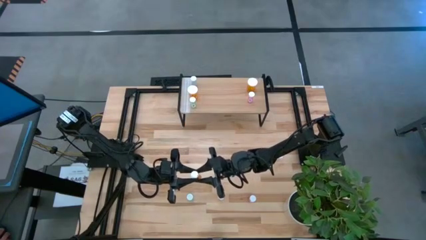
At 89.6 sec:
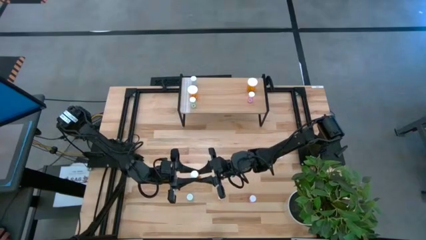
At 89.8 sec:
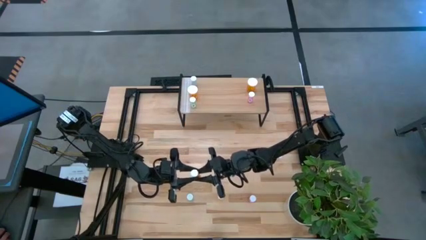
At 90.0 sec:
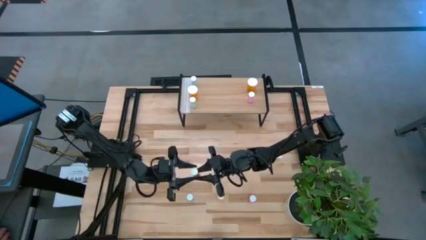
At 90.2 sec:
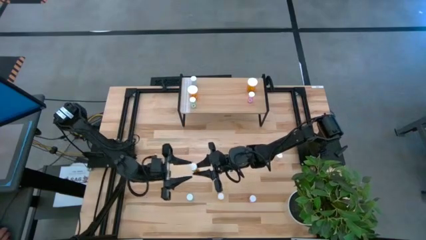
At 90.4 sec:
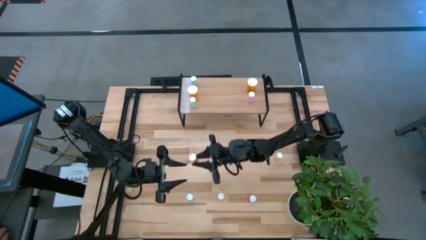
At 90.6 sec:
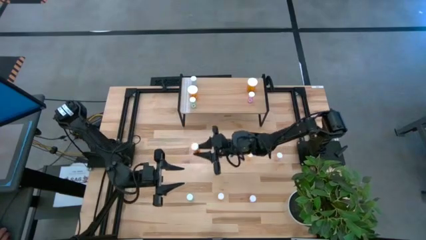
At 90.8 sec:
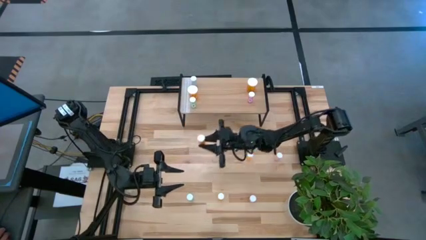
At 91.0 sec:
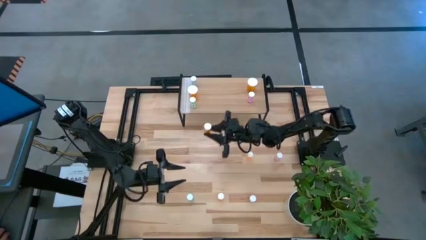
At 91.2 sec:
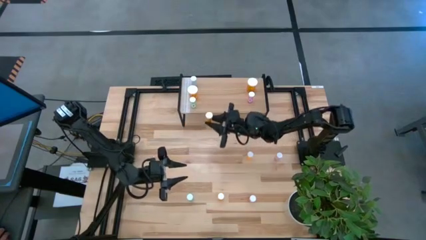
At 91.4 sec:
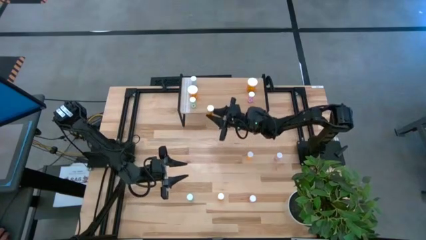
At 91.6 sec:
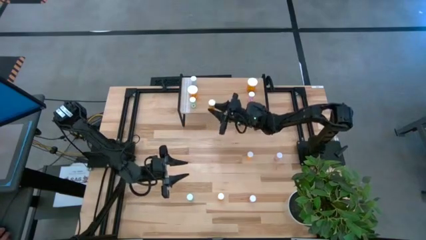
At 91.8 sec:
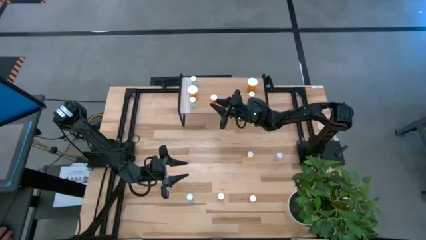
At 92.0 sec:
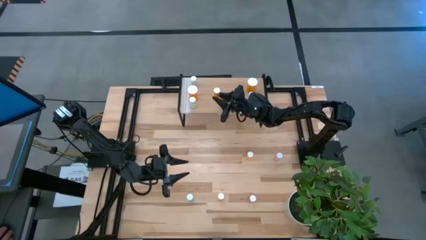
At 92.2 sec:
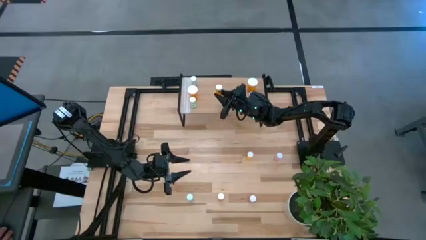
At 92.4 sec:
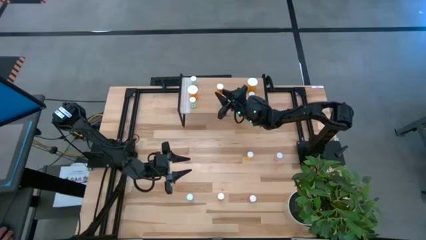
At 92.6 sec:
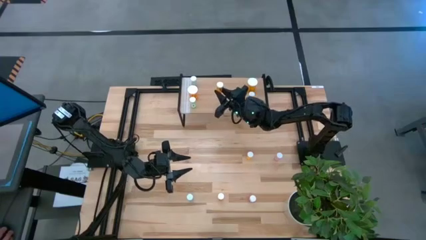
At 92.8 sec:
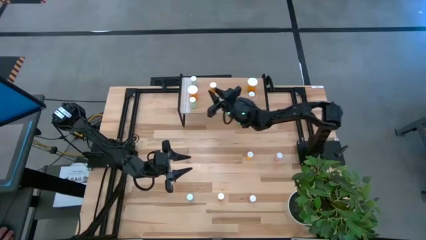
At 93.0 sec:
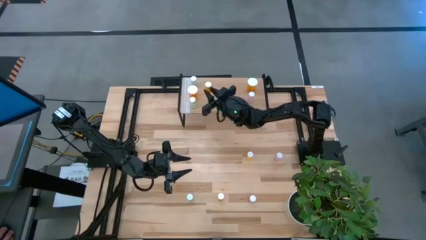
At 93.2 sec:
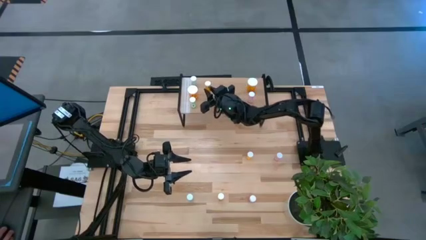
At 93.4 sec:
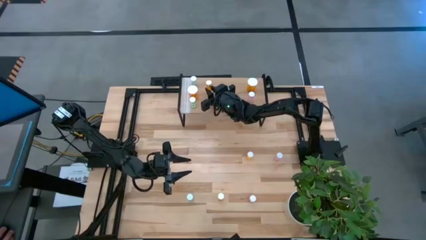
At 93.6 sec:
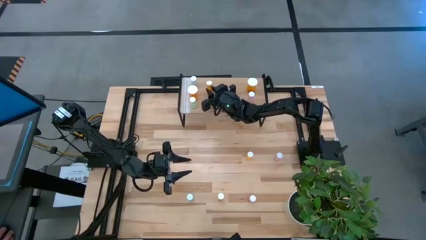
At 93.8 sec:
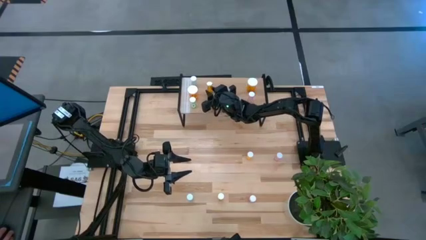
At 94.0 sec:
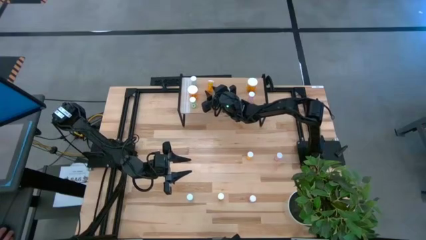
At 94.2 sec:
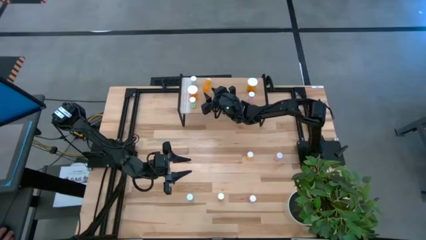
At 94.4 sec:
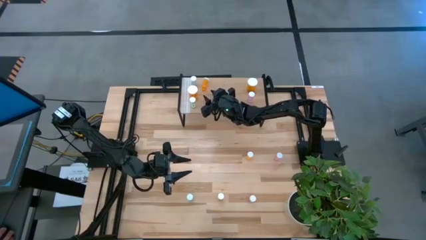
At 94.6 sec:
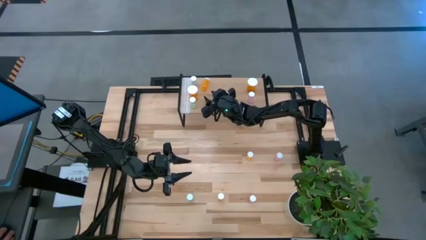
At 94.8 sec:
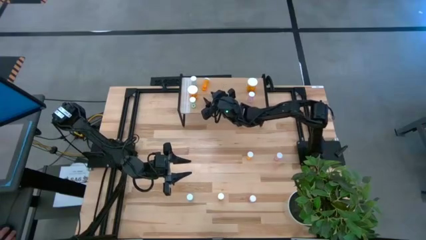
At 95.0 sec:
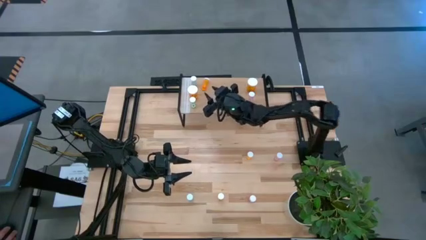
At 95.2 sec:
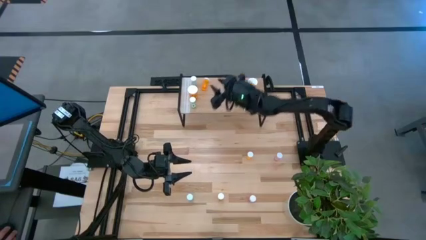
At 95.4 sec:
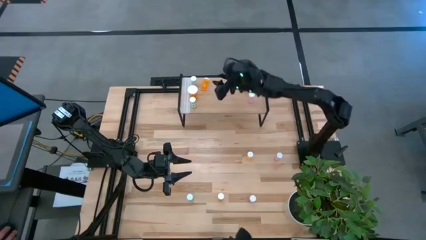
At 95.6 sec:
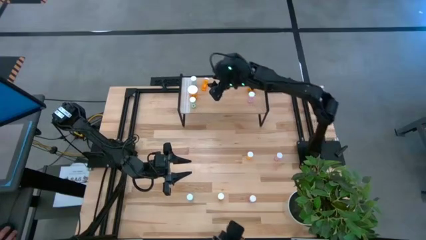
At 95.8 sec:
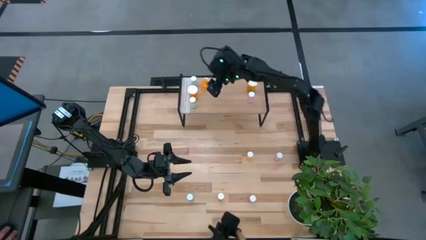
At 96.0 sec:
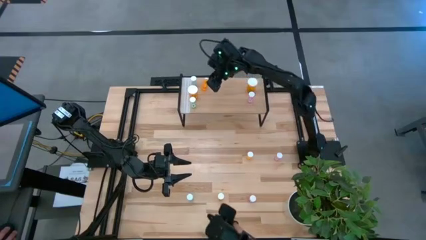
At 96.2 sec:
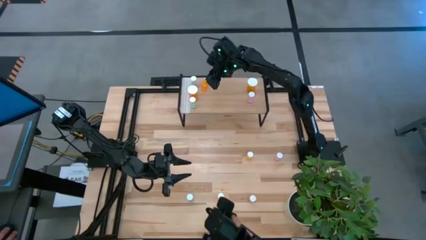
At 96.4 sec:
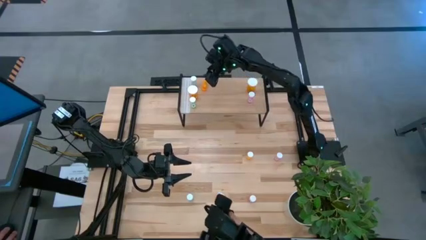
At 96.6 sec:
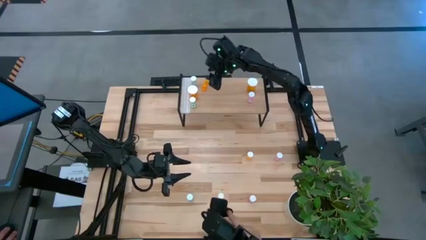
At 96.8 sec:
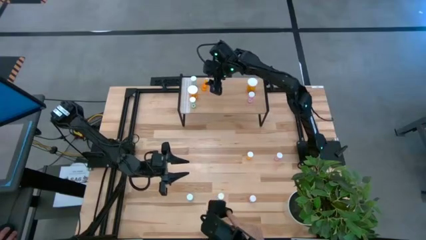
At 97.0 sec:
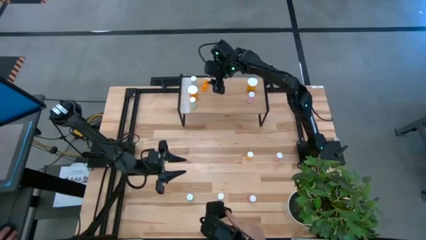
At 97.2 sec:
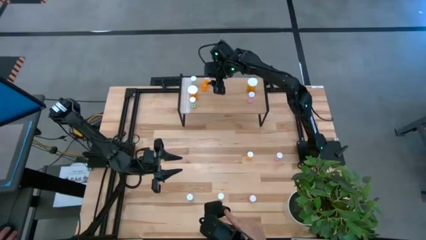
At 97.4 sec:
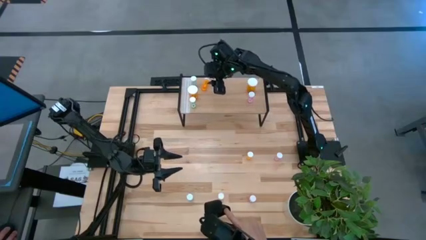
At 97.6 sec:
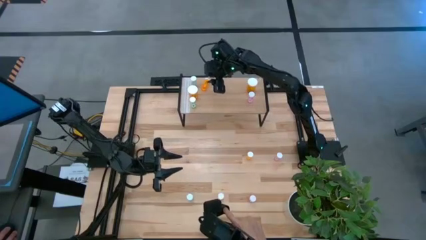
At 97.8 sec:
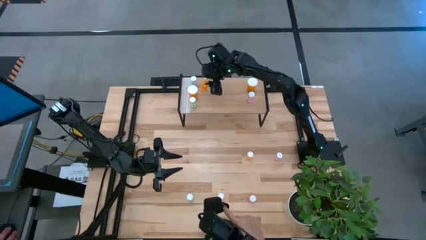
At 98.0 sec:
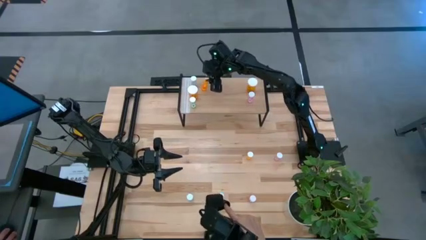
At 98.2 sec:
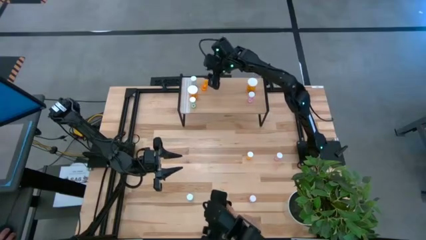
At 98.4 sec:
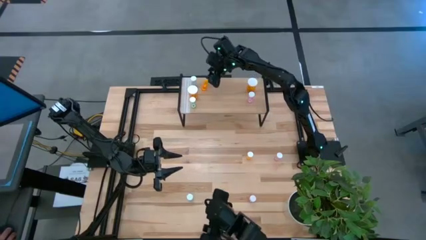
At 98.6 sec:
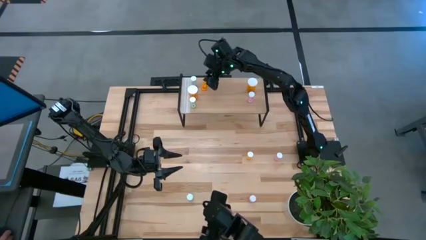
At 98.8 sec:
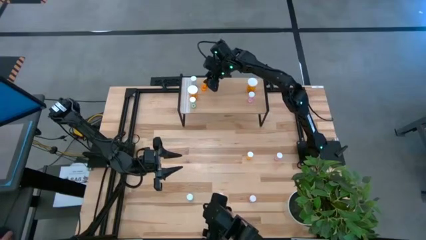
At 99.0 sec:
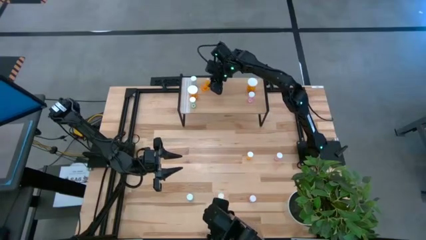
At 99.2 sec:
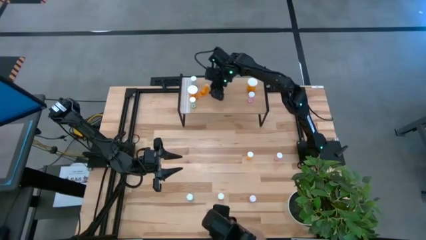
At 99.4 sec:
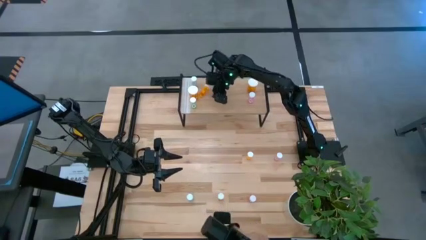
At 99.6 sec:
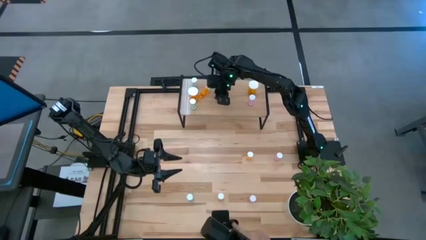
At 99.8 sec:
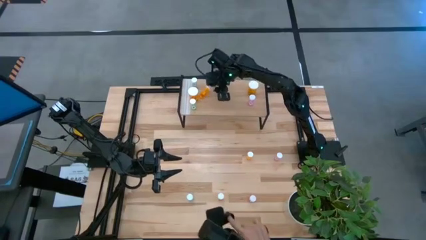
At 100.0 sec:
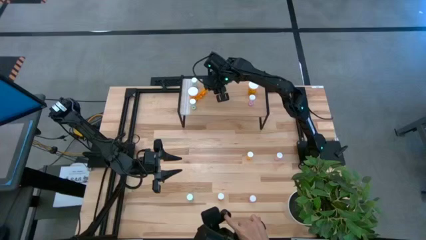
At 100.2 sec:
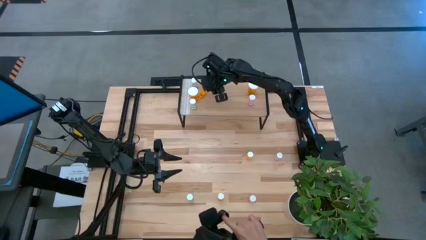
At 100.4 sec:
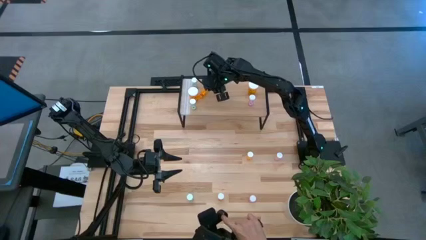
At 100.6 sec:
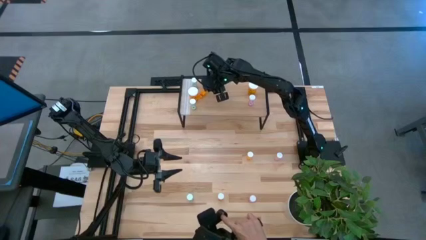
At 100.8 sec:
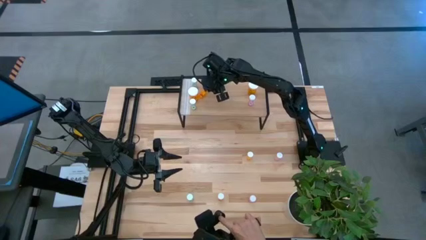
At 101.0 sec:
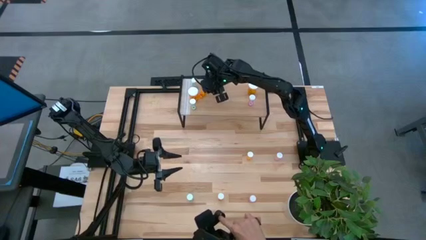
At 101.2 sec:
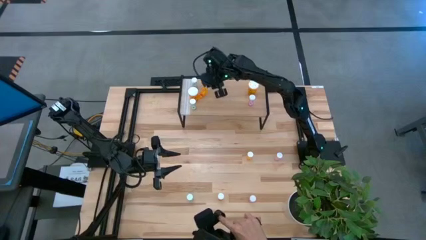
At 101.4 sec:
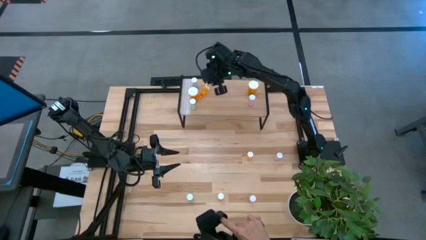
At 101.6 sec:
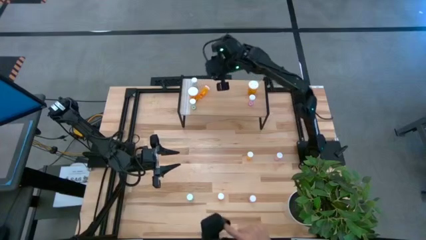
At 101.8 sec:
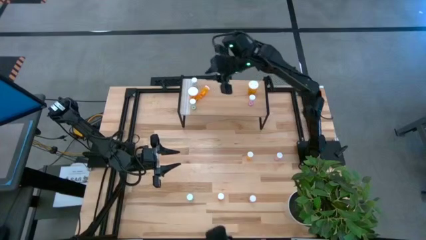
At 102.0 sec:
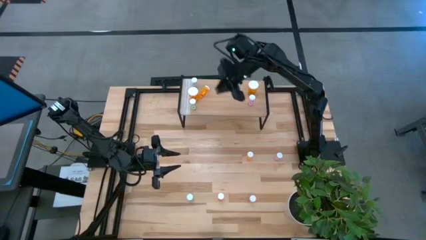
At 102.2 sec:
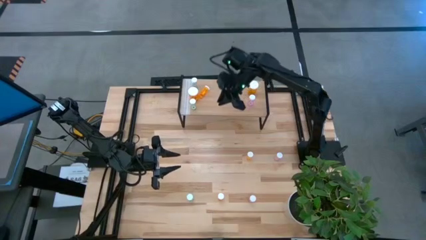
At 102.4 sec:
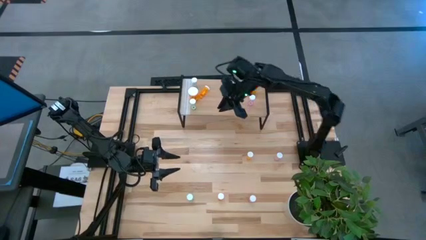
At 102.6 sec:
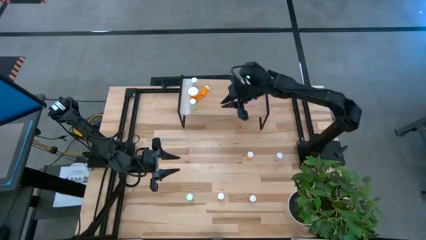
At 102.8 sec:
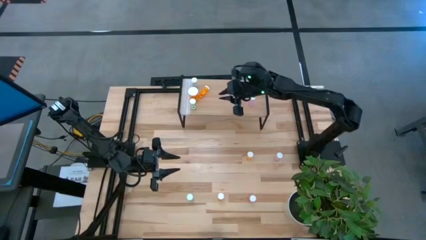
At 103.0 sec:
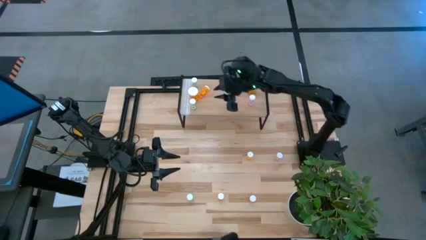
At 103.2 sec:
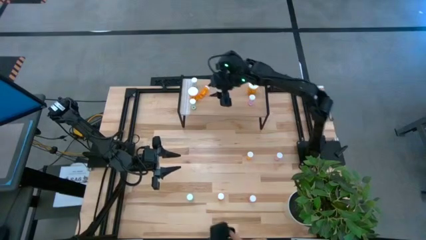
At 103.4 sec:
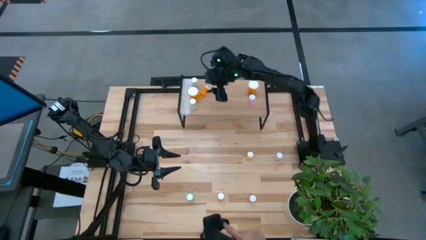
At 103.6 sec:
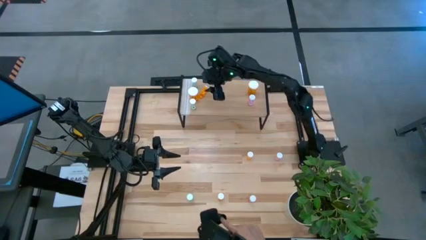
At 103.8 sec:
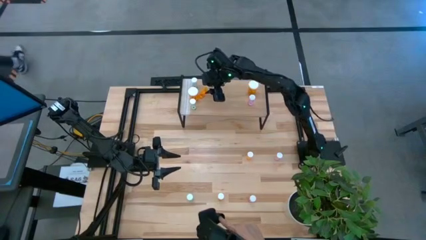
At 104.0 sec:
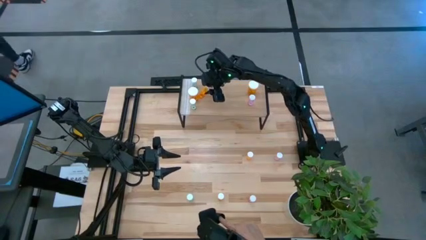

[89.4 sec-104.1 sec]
Task: Pick and place medicine bottles onto shelf by color
Put the bottom left small orange pill bottle on the shelf
